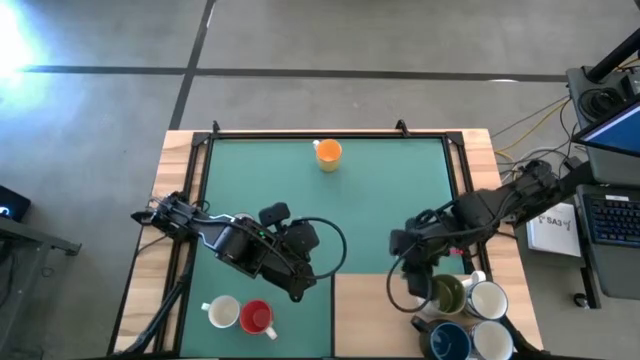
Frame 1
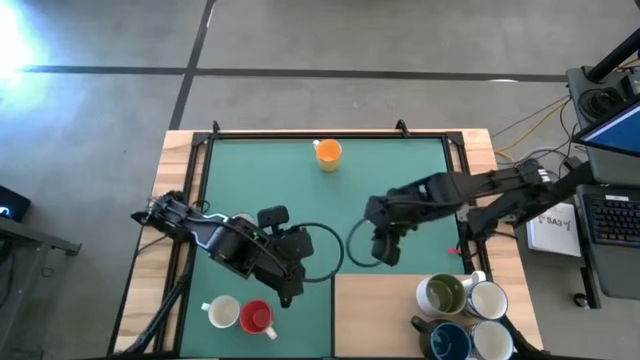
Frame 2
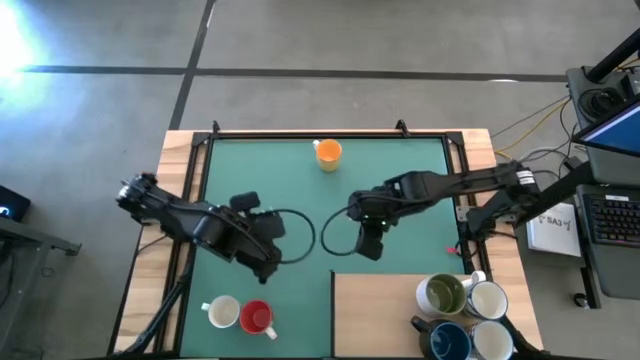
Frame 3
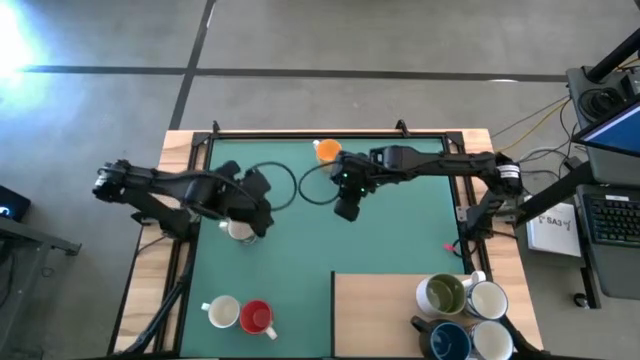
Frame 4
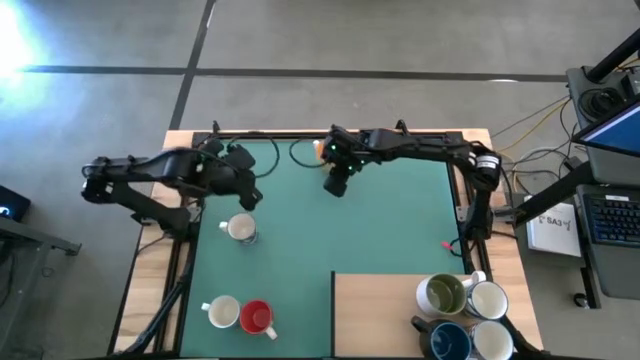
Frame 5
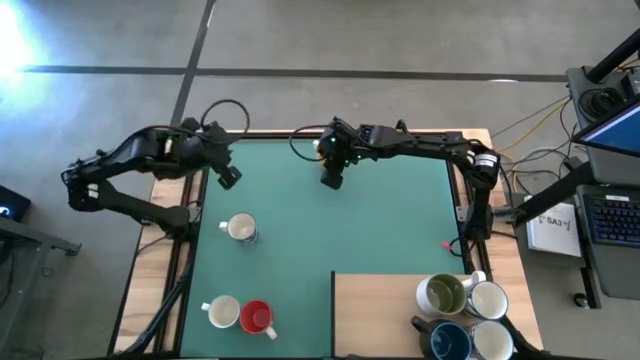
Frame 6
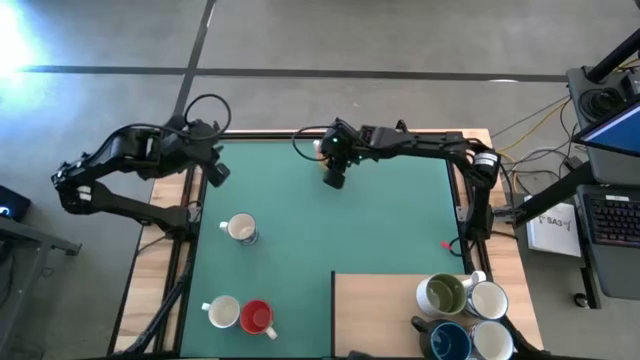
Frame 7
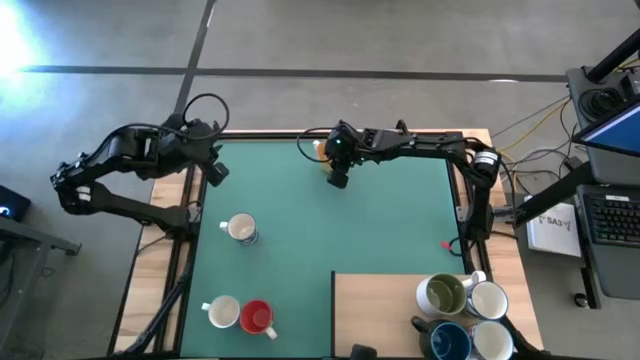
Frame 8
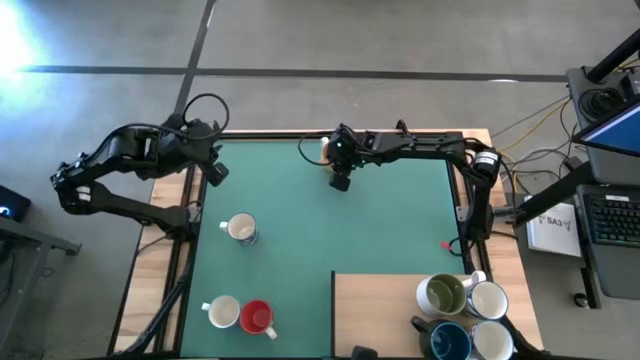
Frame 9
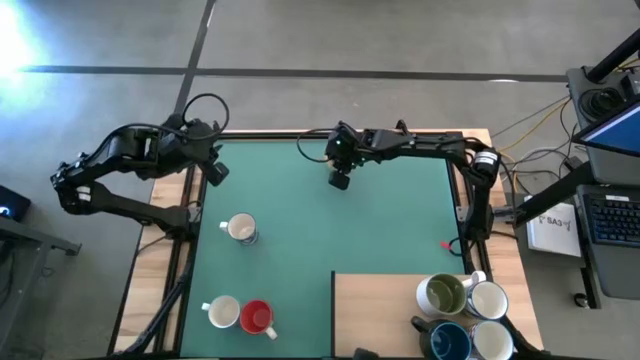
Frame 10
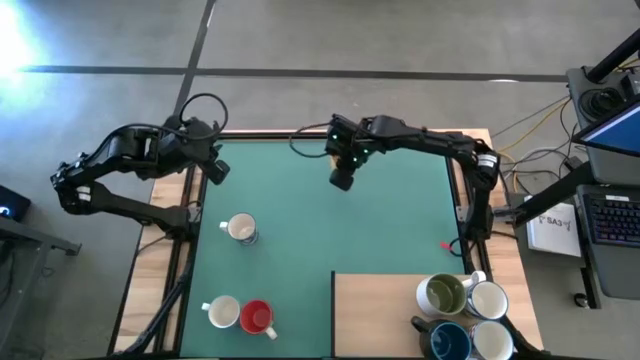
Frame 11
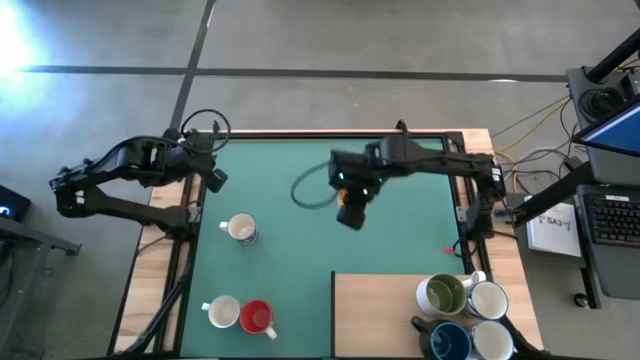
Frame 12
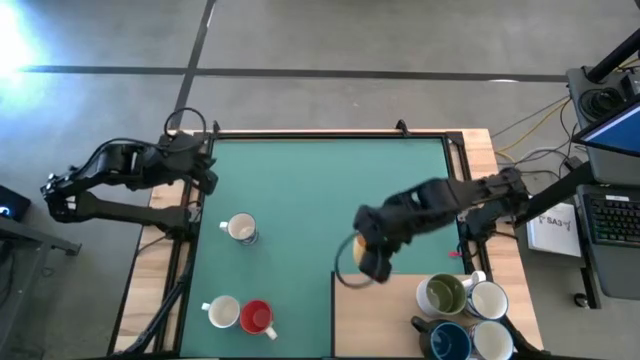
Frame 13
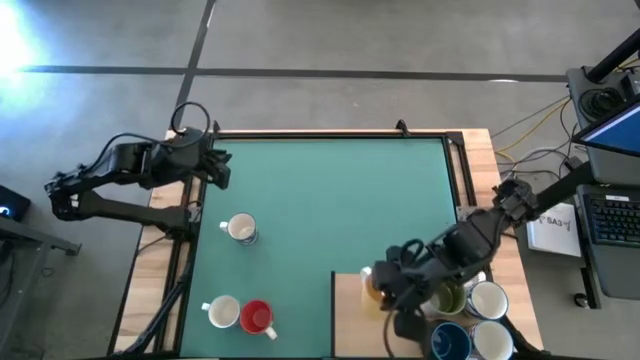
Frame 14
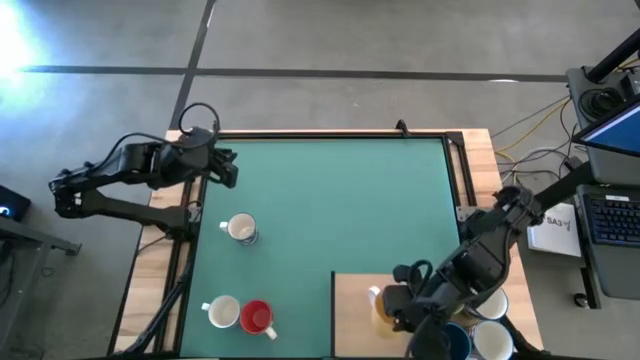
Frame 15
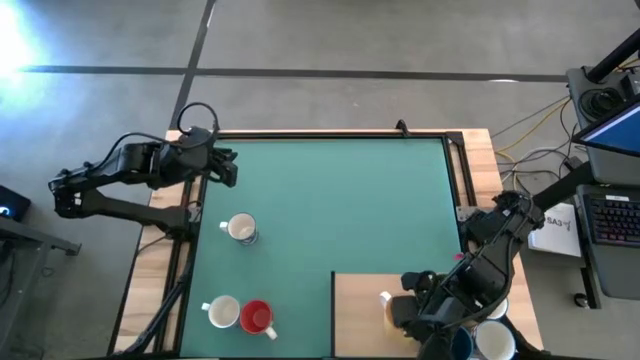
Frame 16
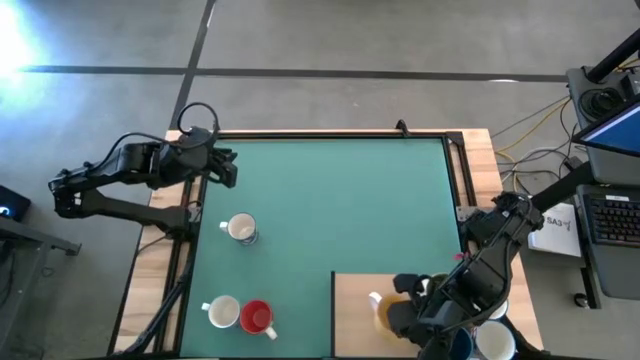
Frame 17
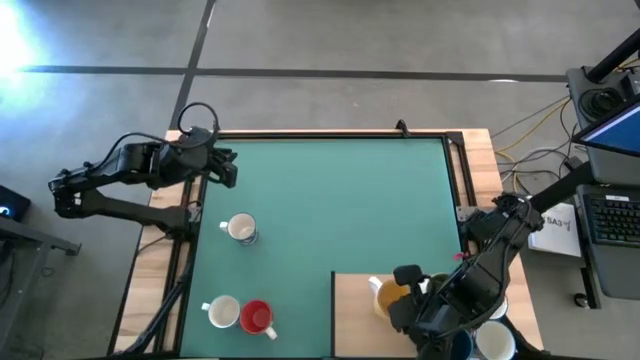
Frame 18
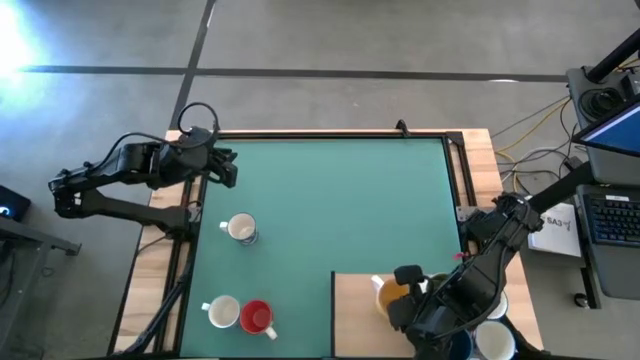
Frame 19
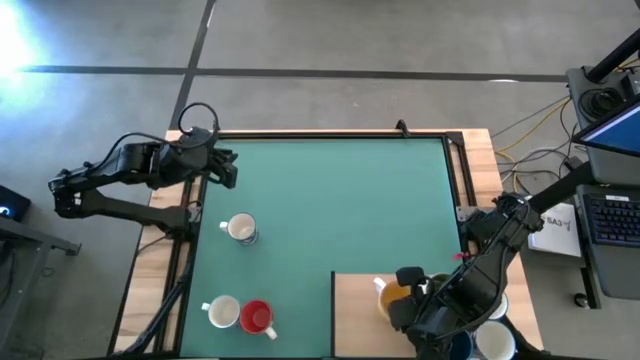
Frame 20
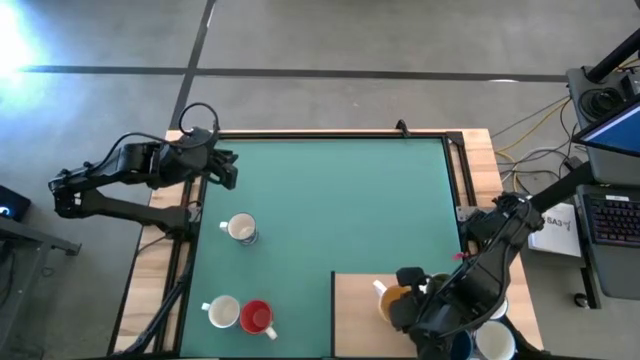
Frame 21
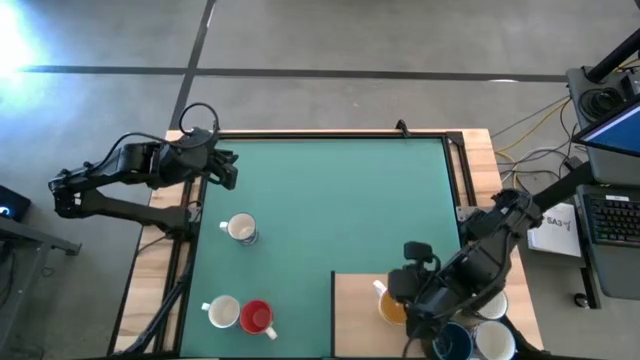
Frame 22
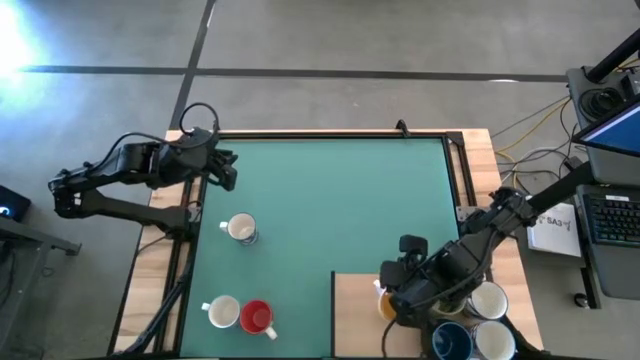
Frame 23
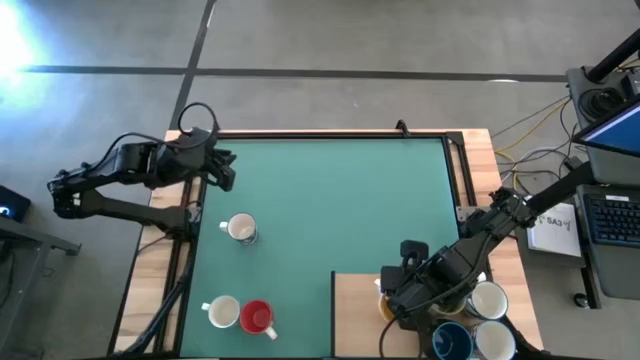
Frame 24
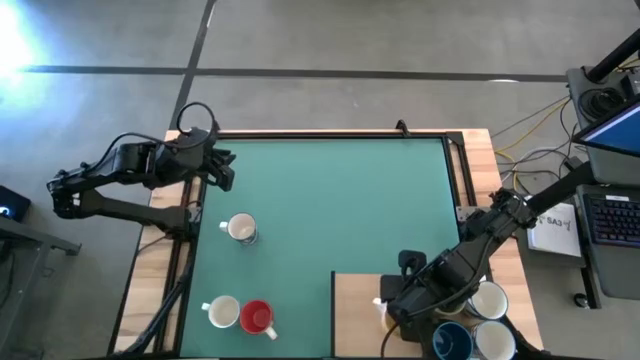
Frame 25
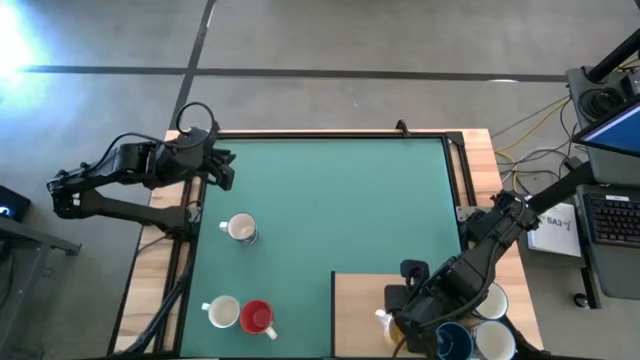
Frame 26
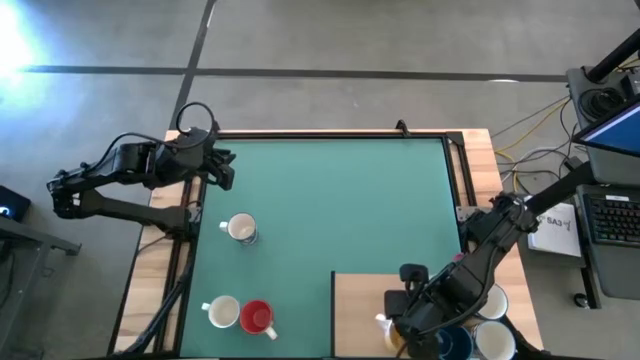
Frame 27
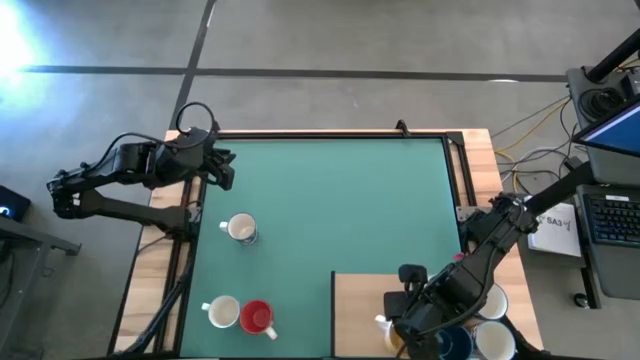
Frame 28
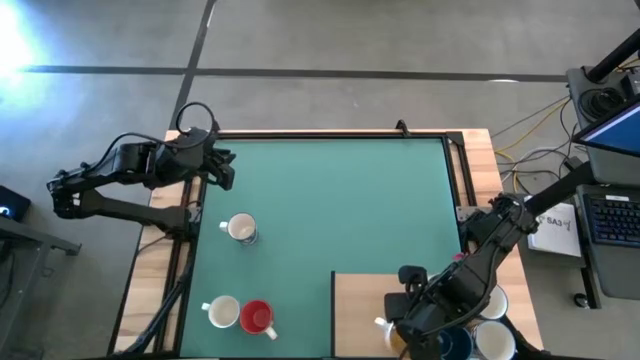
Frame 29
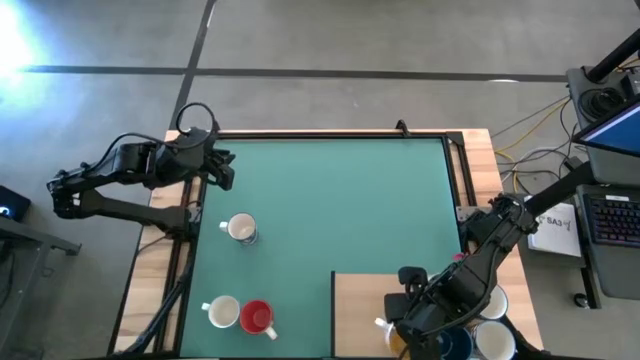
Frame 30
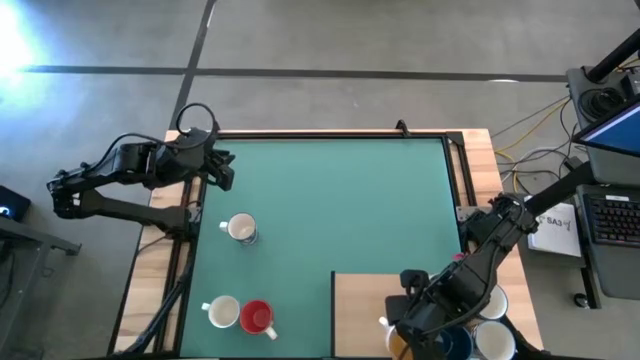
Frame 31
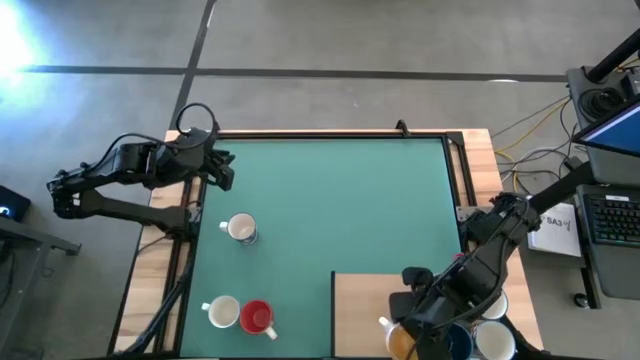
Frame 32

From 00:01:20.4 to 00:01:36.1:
Task: Place coffee mugs
Put the yellow mug on the shelf

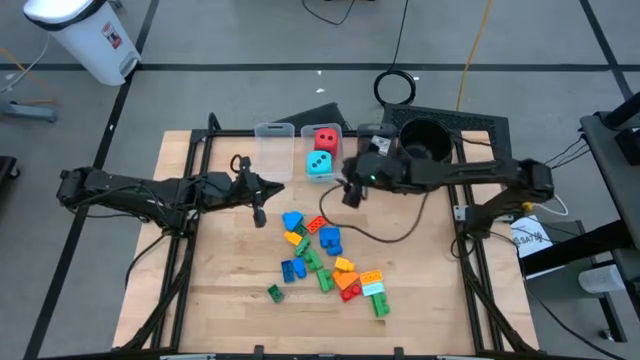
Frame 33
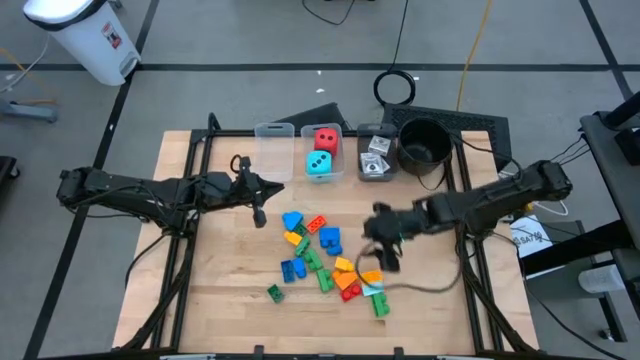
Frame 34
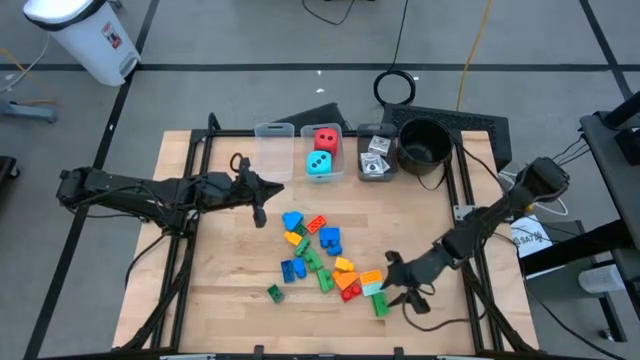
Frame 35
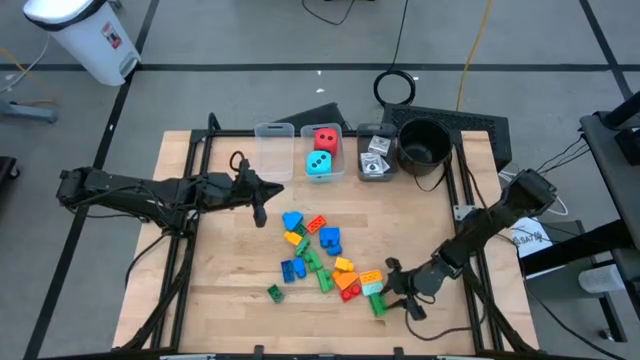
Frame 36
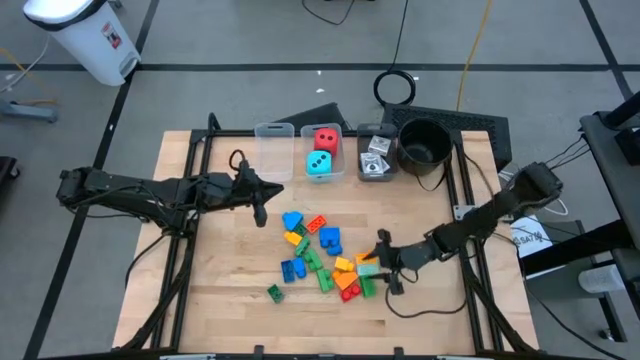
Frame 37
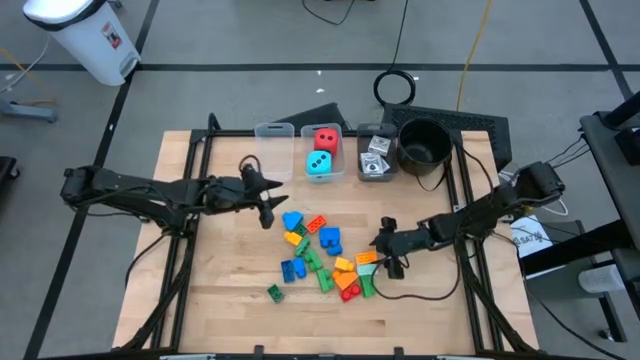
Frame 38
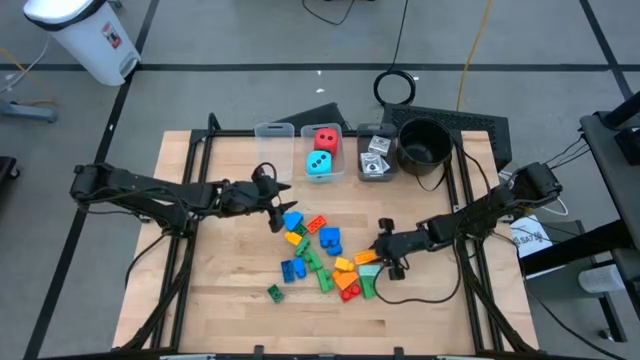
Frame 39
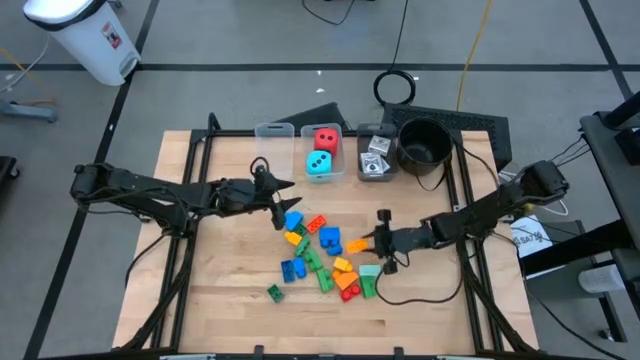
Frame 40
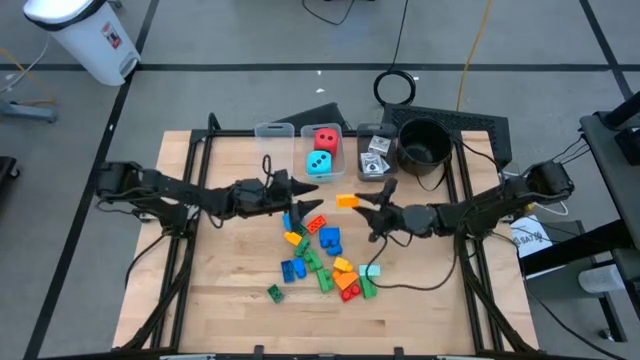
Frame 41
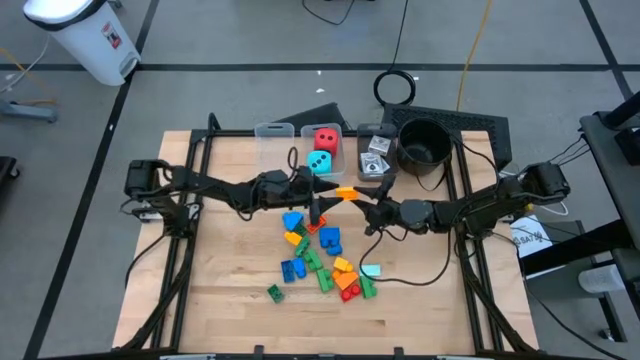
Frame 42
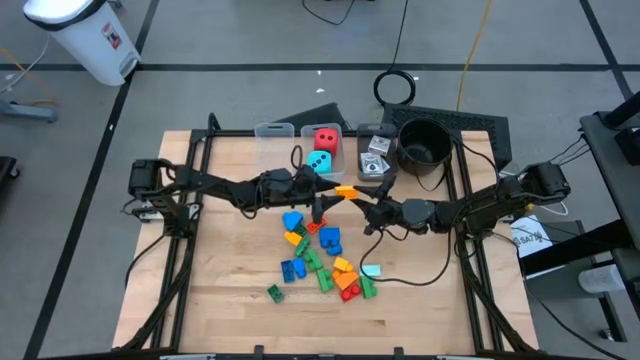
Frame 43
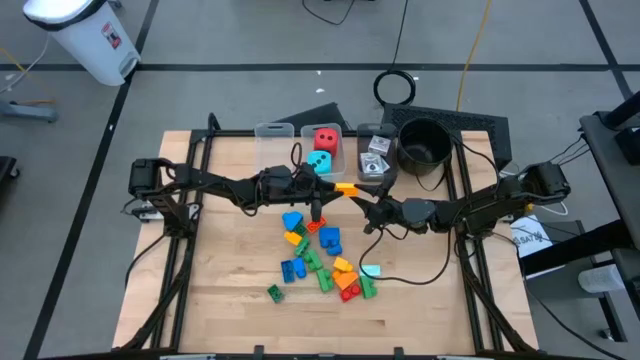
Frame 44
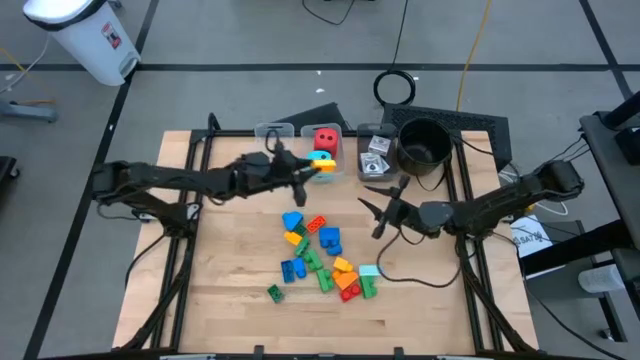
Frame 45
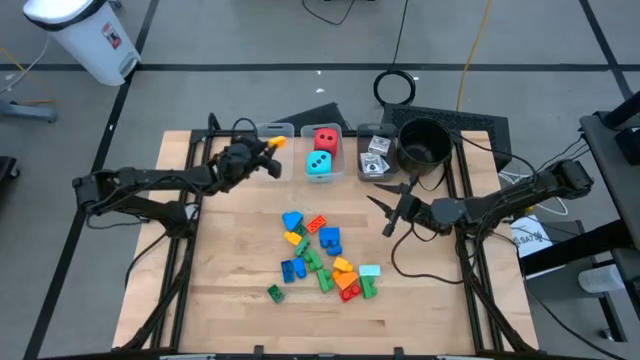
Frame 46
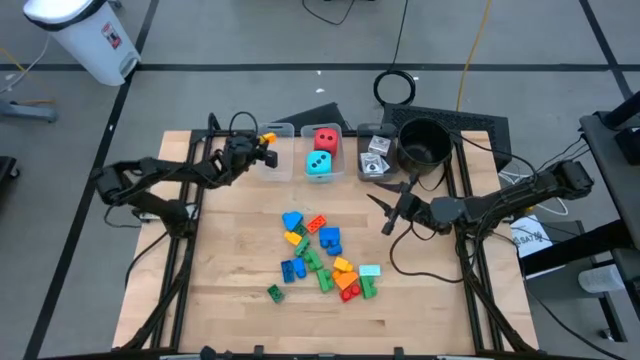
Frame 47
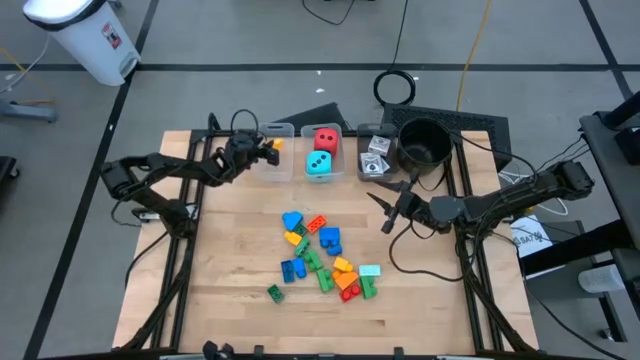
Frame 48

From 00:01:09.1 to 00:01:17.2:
Task: Pick & Place Toys
Put the yellow game piece into the left transparent bin
